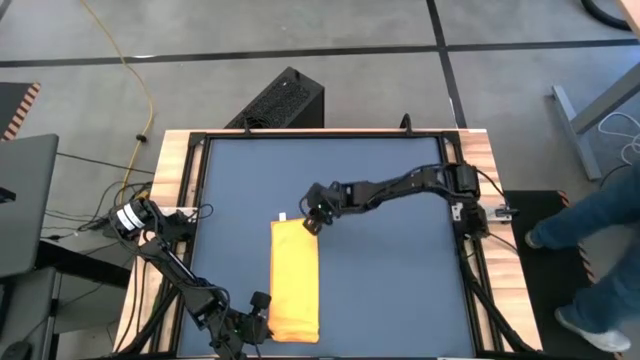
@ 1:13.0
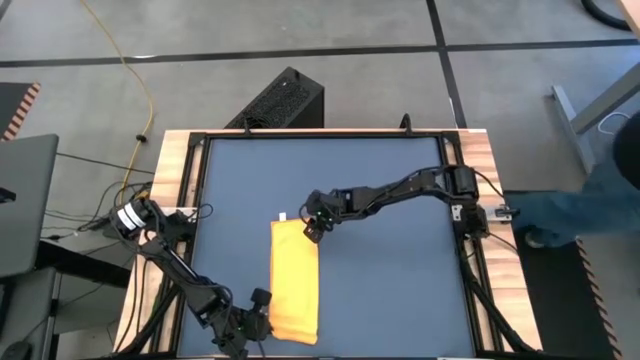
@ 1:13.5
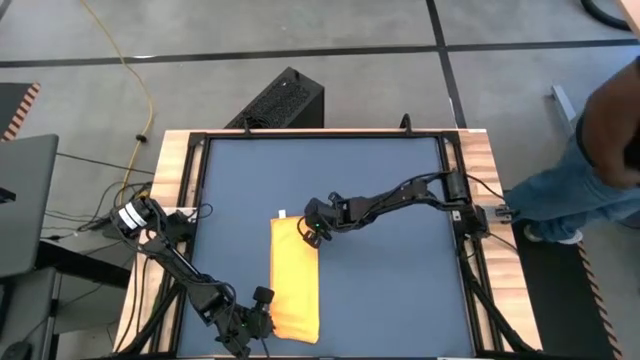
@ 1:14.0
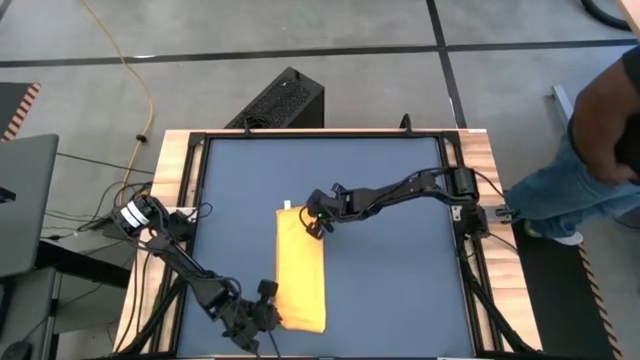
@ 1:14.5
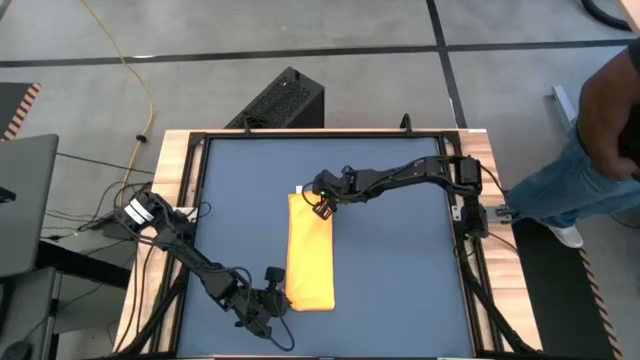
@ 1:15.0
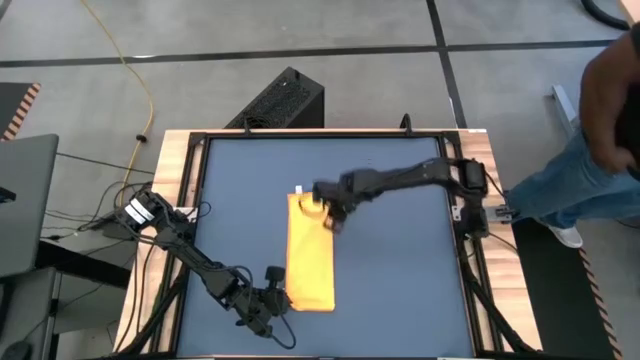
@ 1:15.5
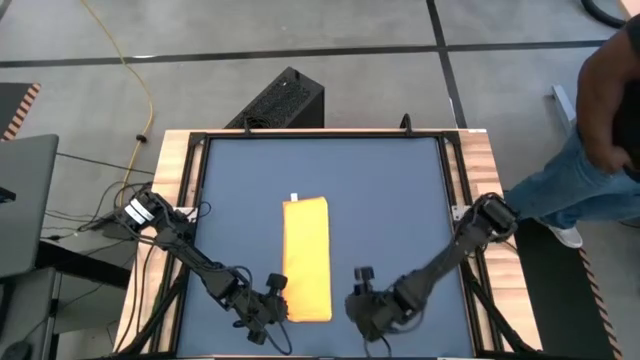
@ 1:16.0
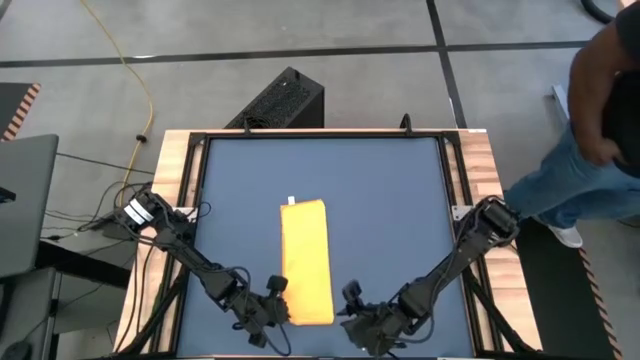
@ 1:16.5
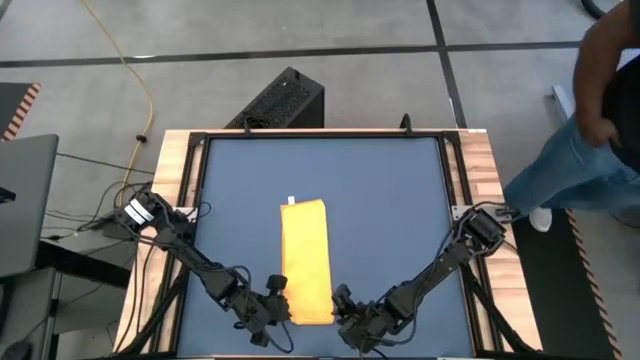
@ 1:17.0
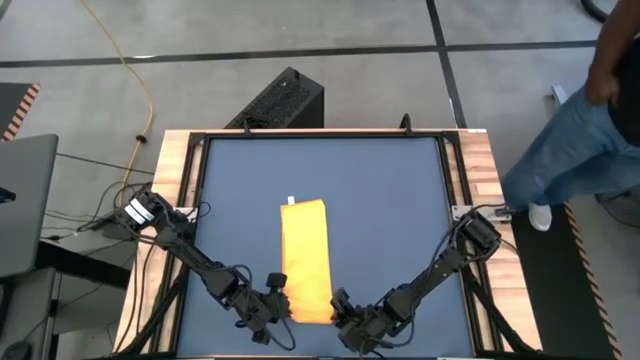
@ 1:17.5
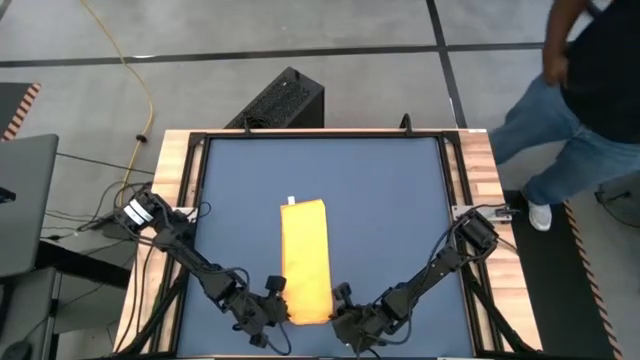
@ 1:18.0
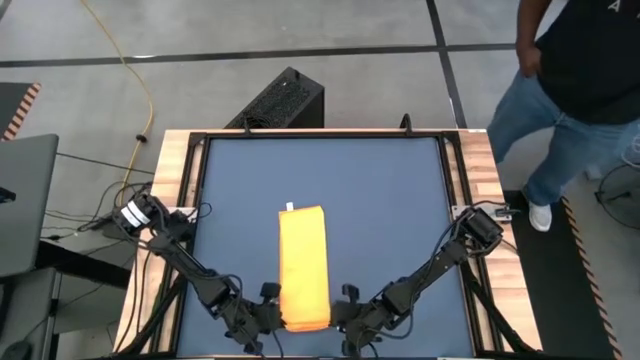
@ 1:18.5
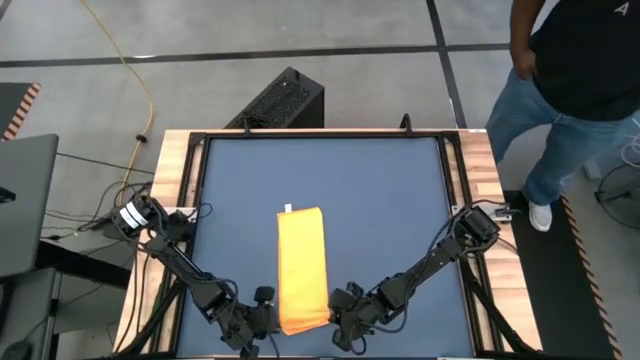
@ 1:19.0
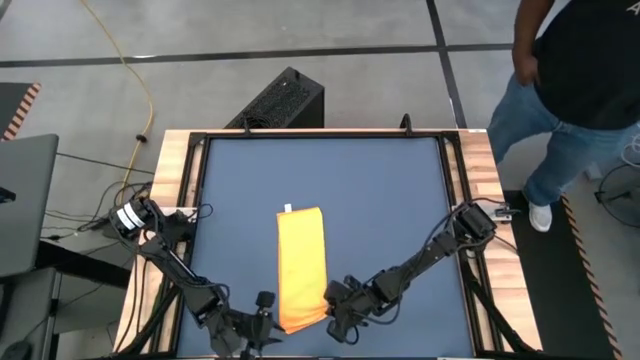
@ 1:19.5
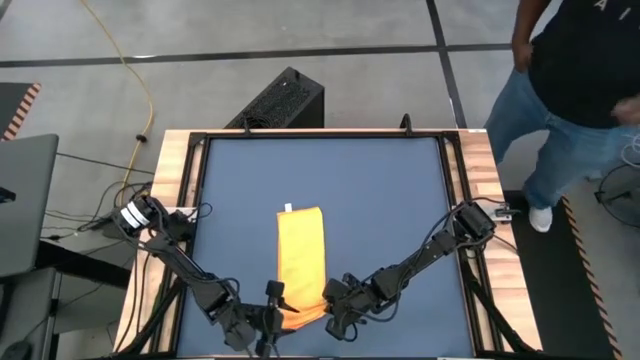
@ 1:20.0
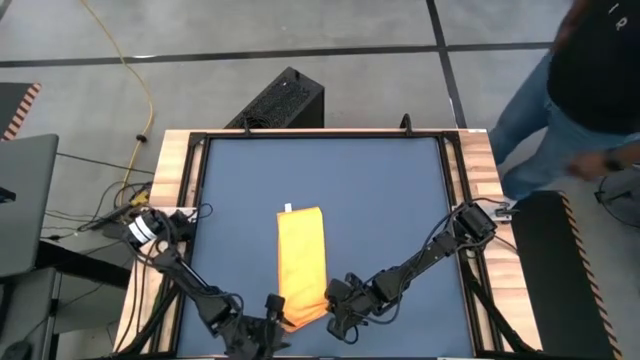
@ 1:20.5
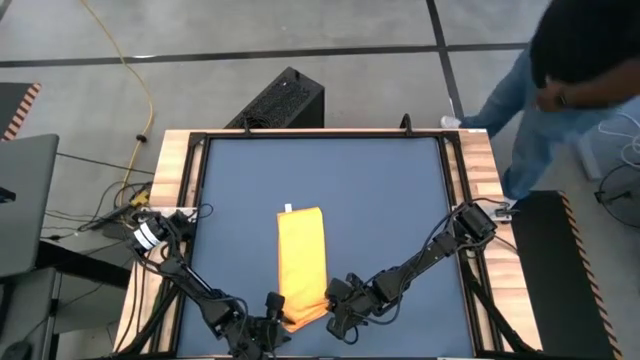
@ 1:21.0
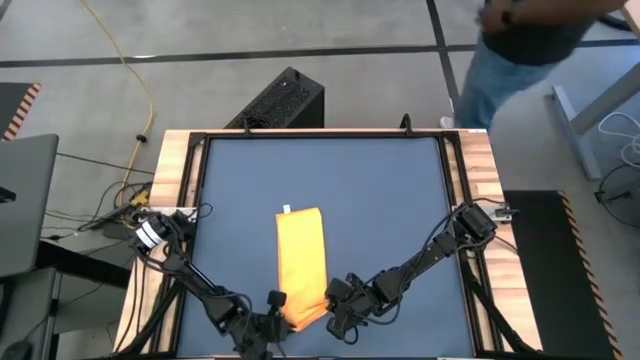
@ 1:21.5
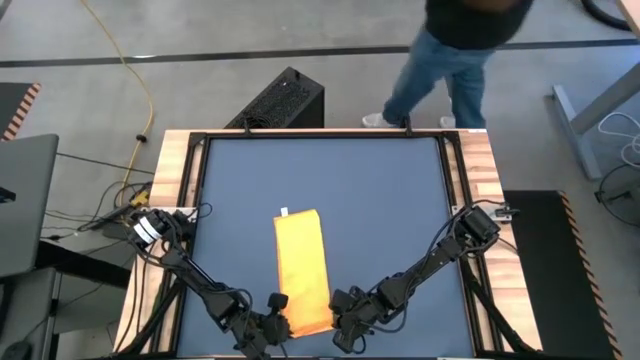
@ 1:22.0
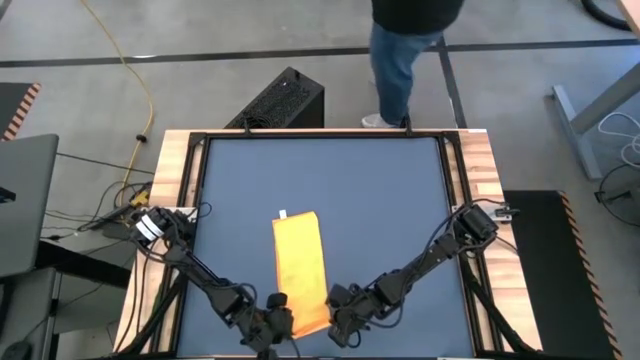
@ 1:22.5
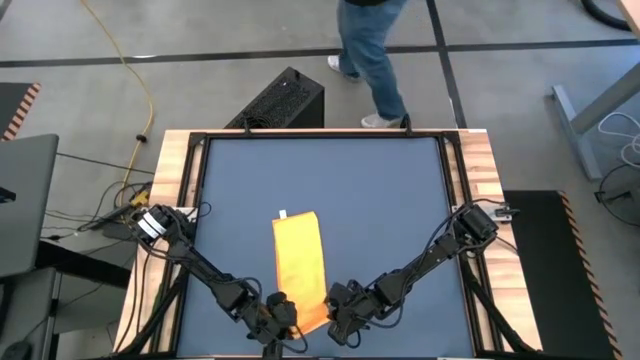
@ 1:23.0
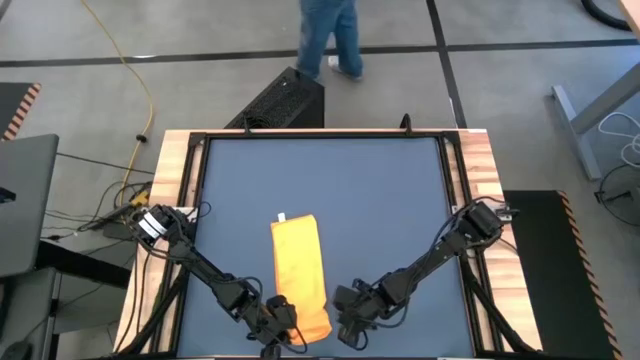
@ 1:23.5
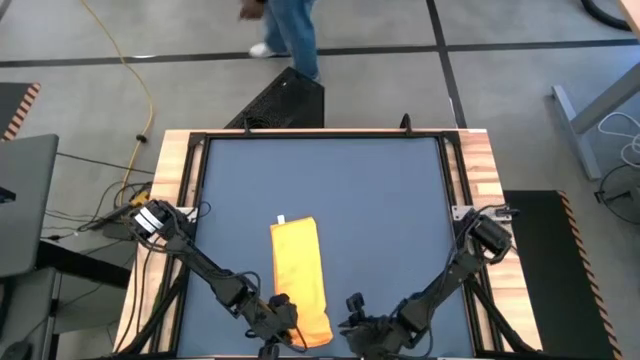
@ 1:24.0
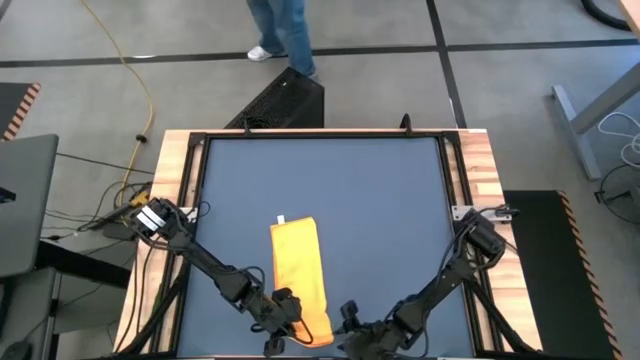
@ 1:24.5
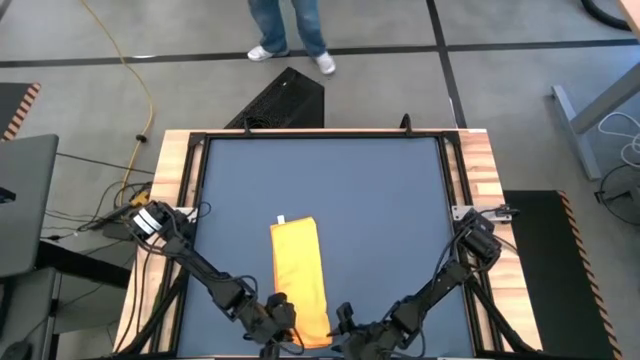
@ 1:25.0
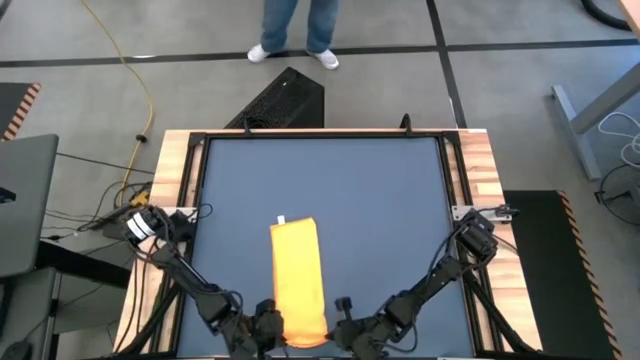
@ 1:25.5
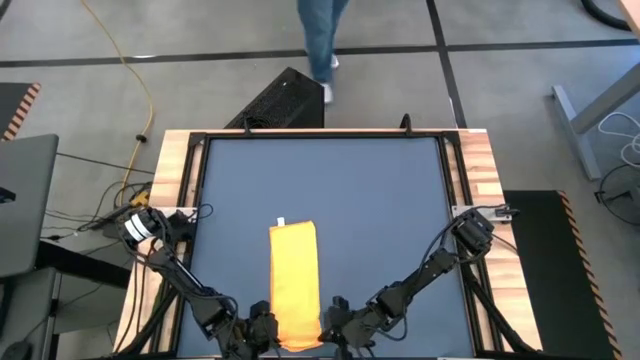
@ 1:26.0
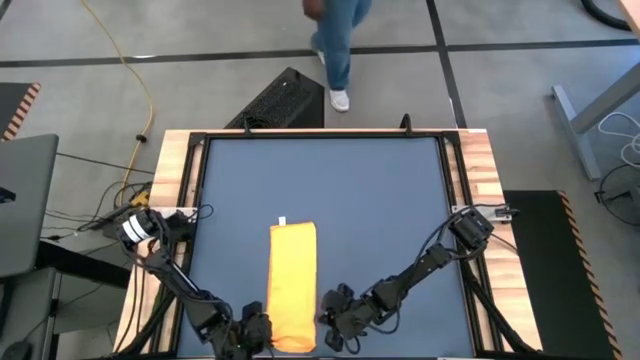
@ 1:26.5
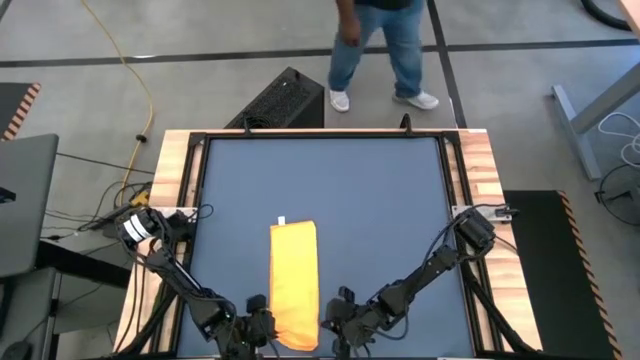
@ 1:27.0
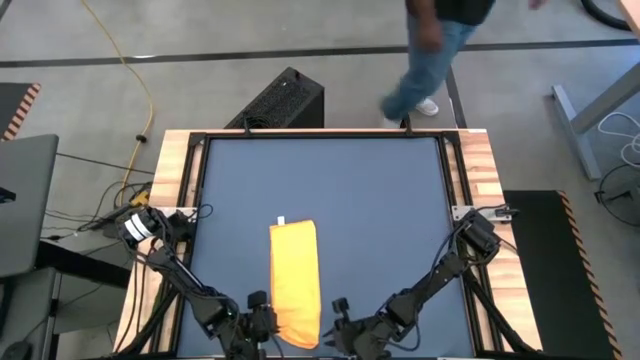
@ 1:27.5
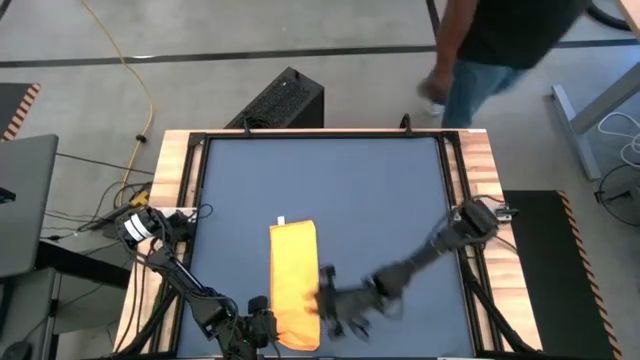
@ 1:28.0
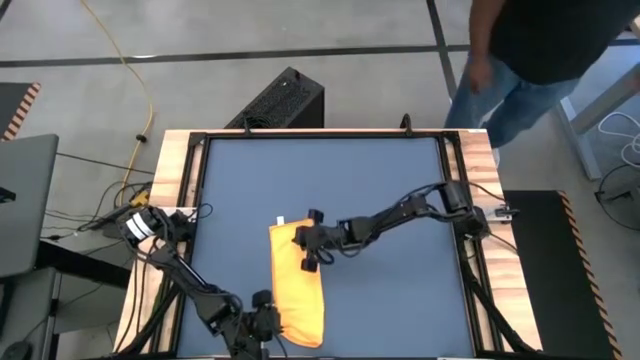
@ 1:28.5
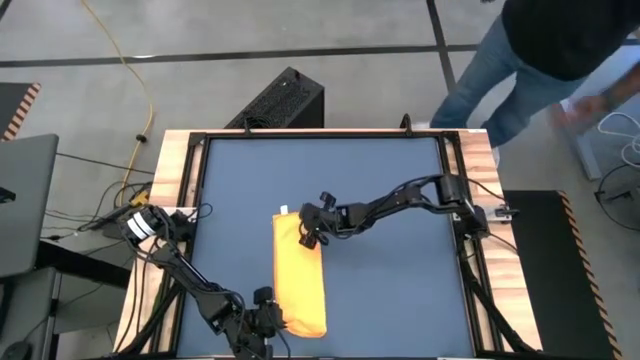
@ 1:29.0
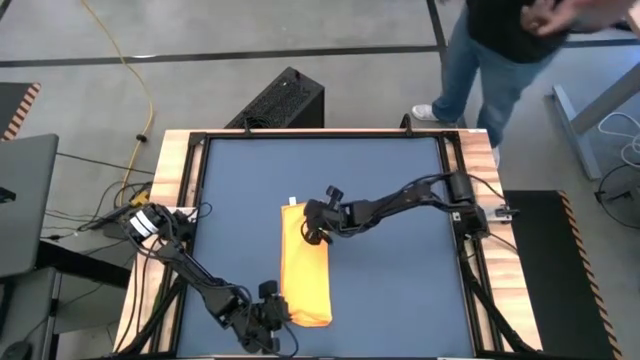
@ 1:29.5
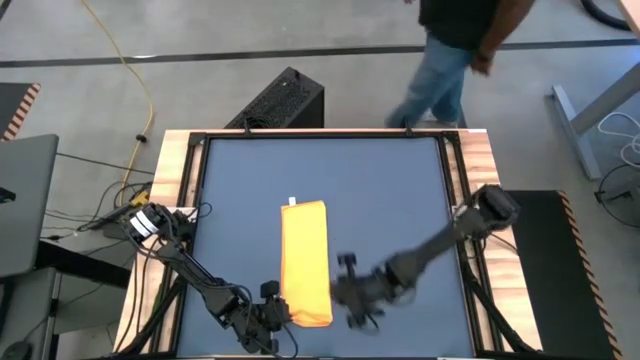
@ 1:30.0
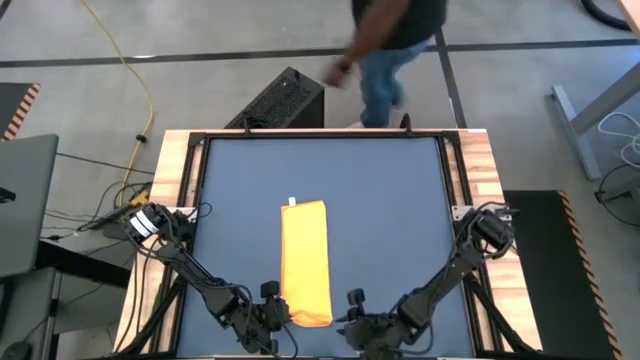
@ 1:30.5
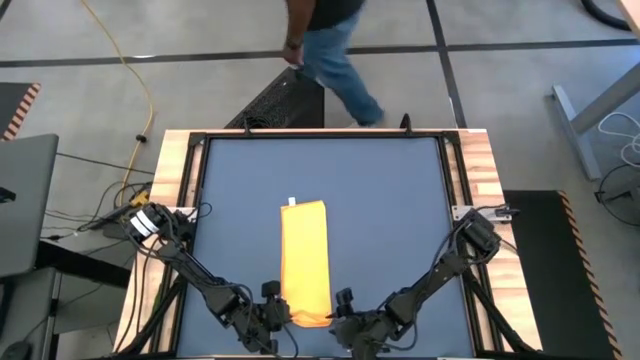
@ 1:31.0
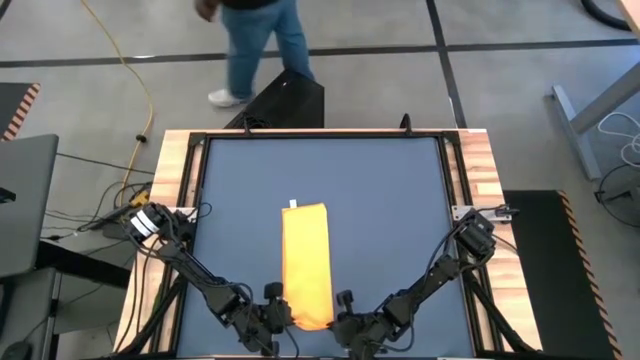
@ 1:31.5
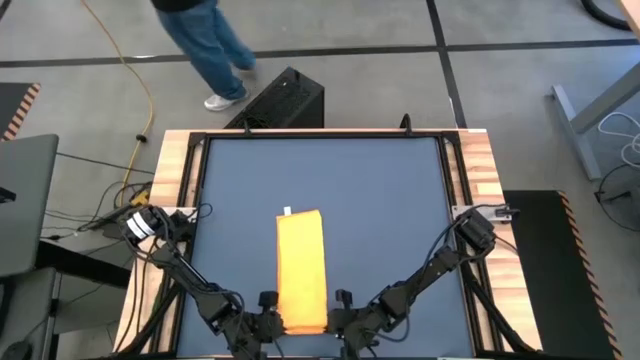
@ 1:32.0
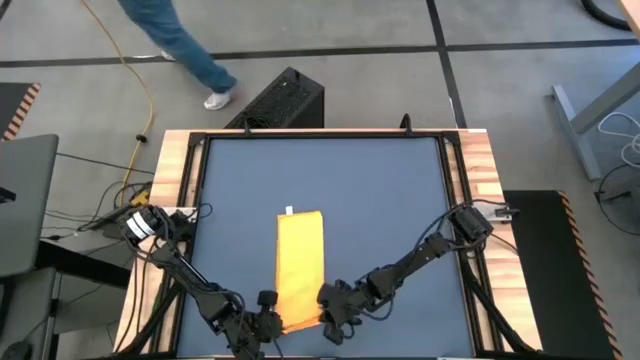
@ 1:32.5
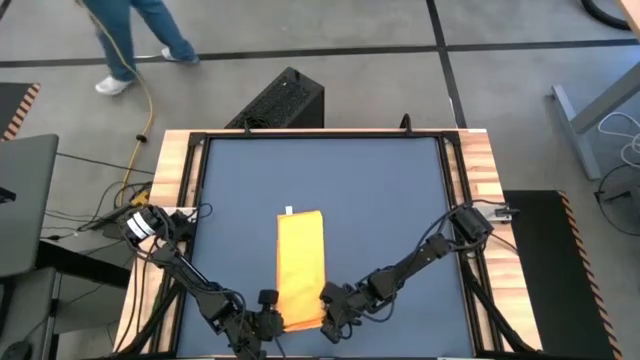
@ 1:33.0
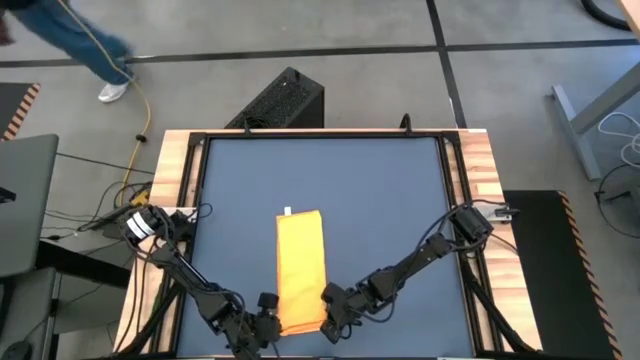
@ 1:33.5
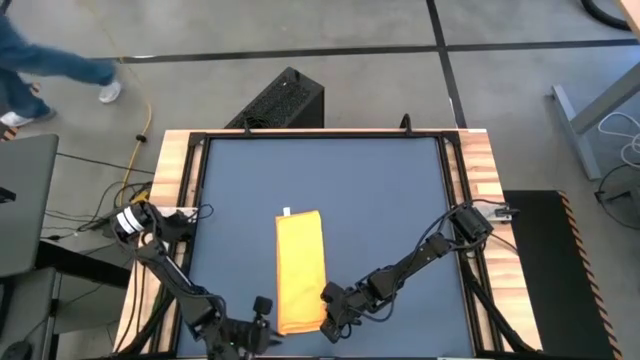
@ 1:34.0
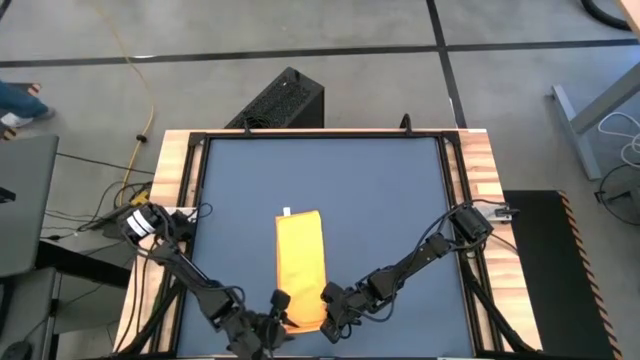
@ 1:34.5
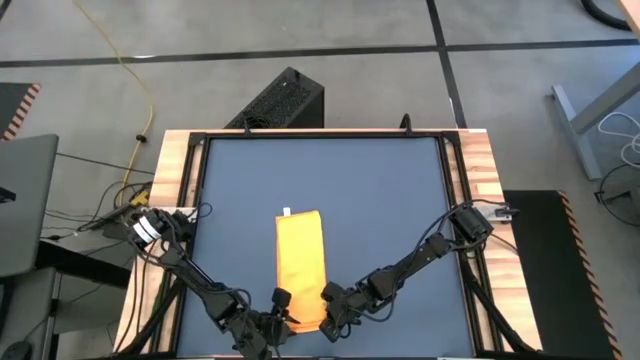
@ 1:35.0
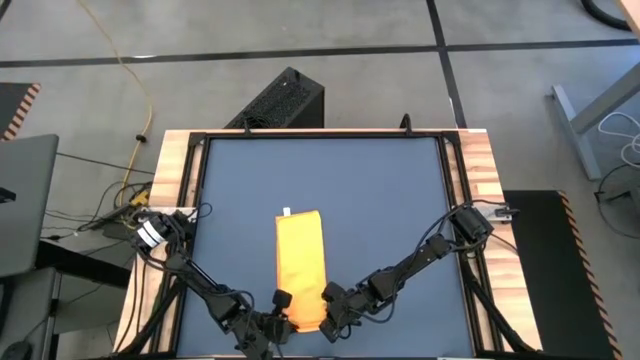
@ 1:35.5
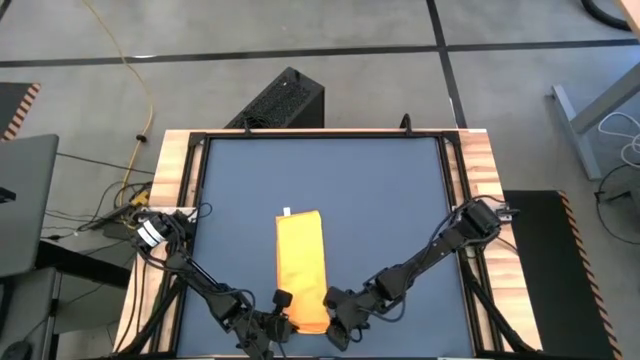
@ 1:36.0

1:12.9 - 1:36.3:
Task: Roll towel into tight, uniform cylinder
Roll the orange towel
